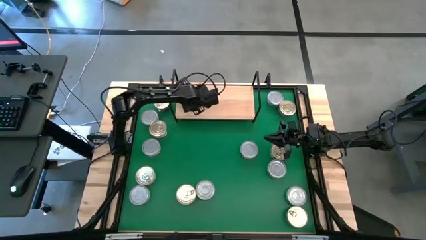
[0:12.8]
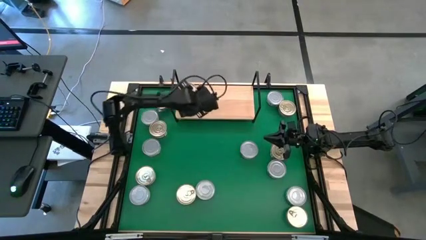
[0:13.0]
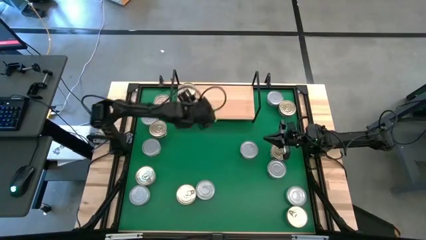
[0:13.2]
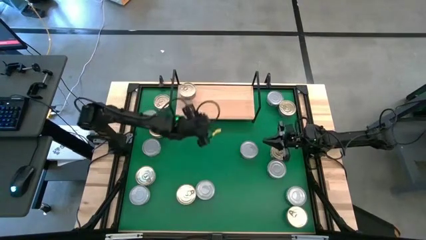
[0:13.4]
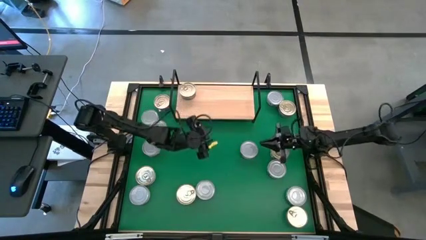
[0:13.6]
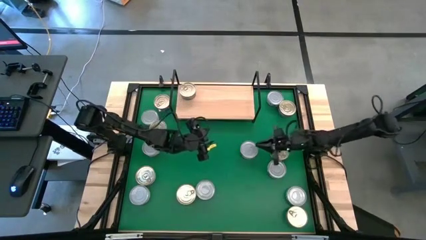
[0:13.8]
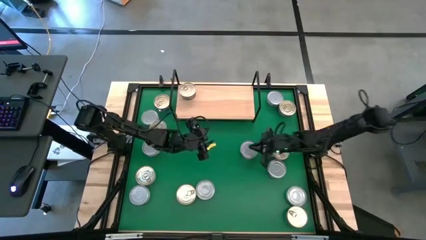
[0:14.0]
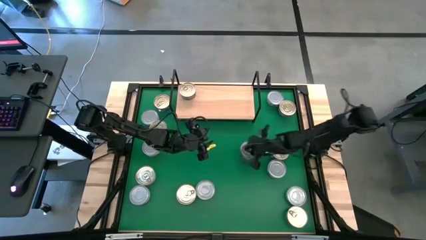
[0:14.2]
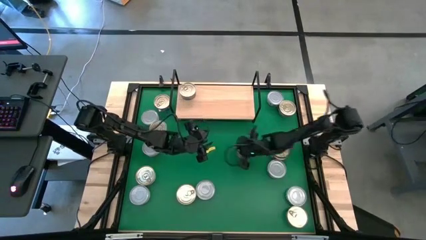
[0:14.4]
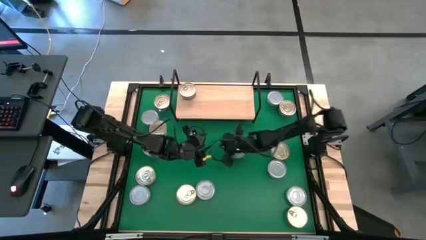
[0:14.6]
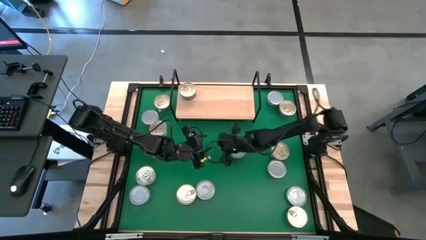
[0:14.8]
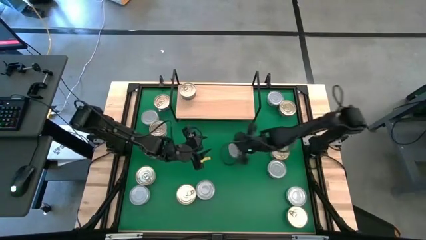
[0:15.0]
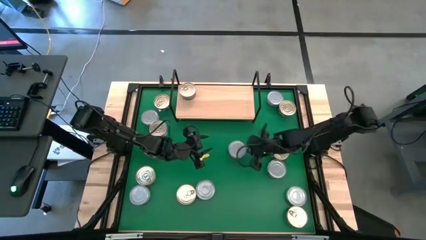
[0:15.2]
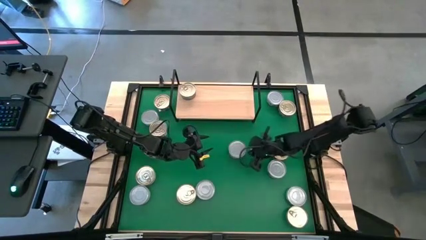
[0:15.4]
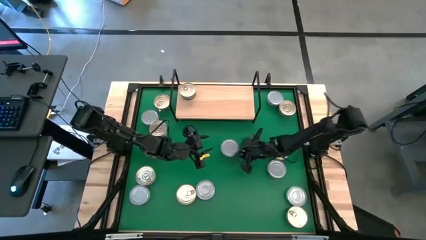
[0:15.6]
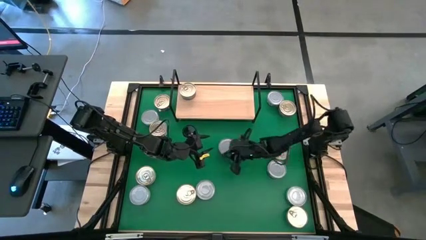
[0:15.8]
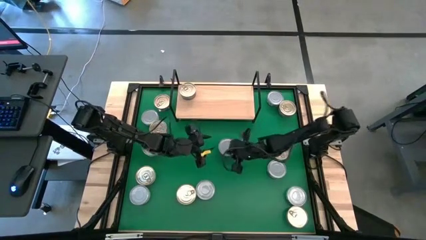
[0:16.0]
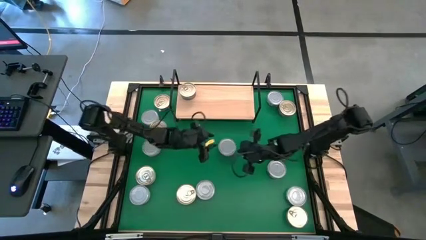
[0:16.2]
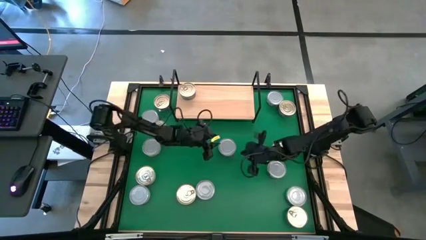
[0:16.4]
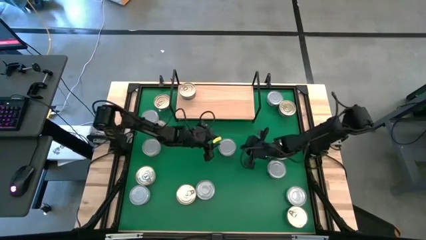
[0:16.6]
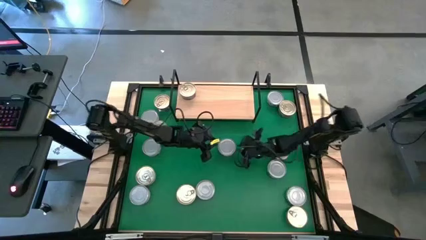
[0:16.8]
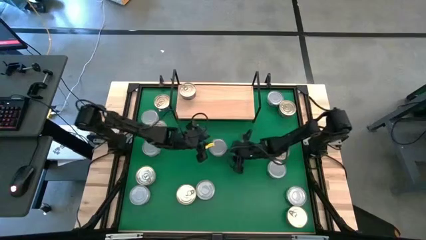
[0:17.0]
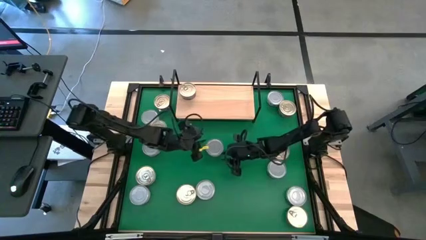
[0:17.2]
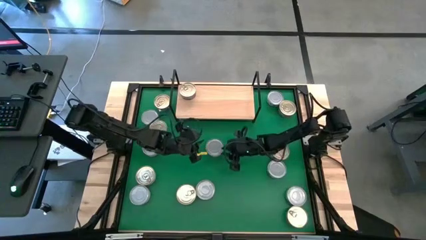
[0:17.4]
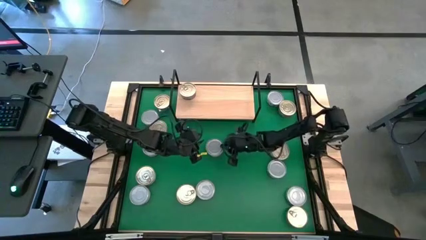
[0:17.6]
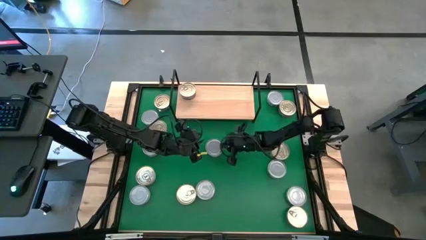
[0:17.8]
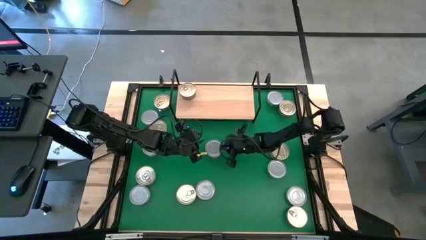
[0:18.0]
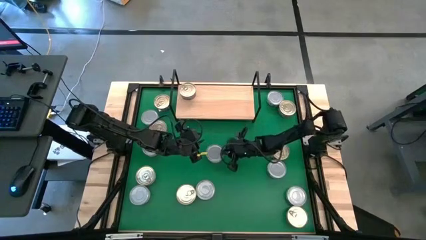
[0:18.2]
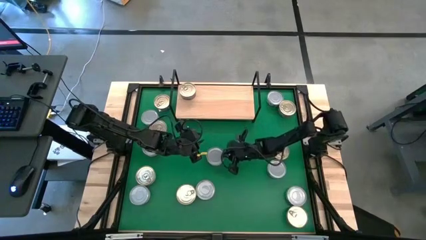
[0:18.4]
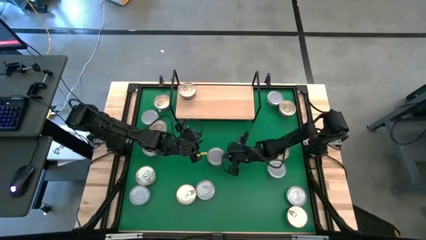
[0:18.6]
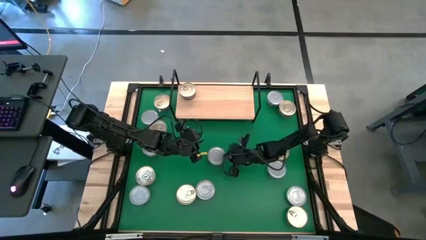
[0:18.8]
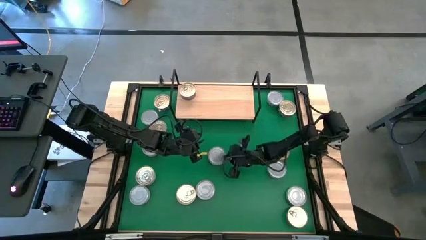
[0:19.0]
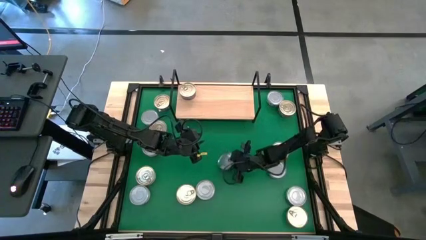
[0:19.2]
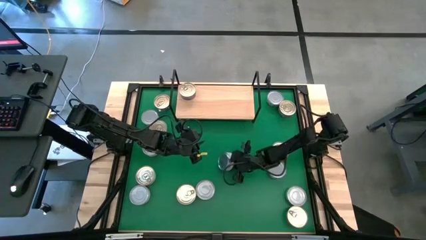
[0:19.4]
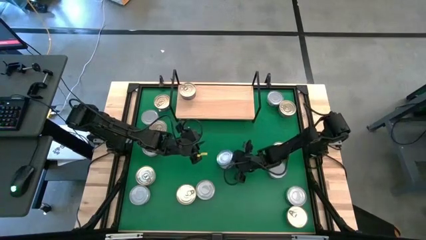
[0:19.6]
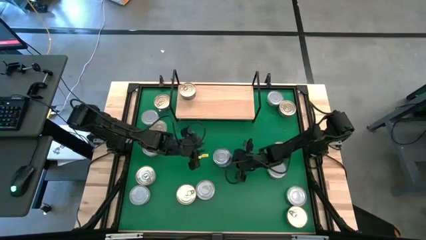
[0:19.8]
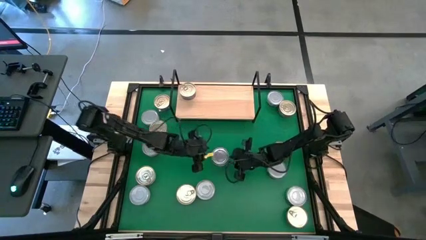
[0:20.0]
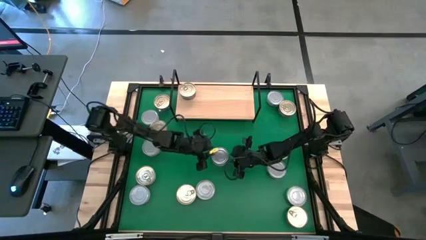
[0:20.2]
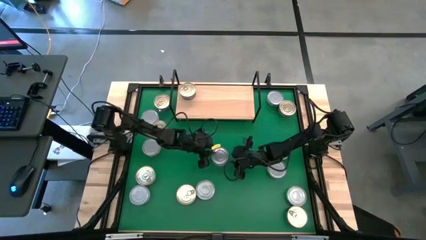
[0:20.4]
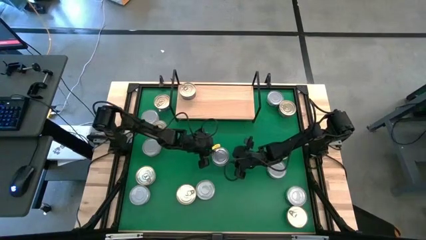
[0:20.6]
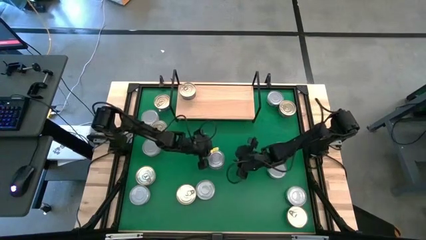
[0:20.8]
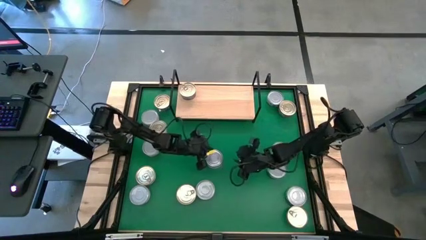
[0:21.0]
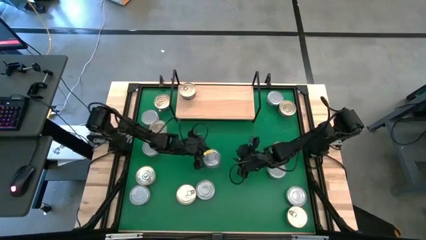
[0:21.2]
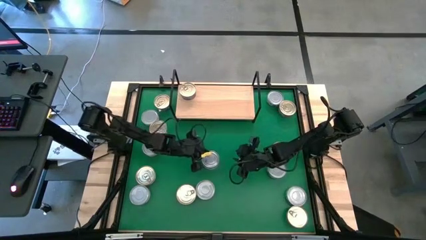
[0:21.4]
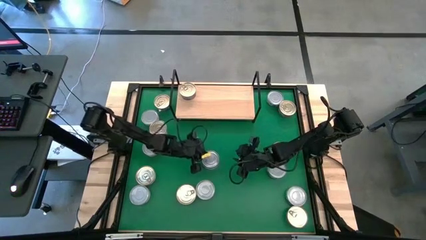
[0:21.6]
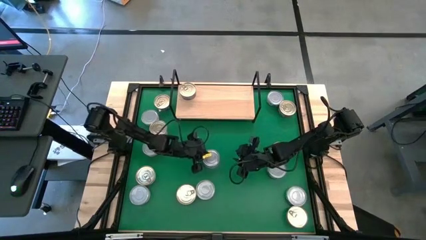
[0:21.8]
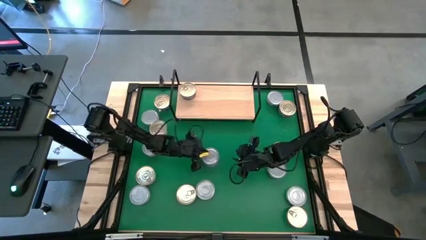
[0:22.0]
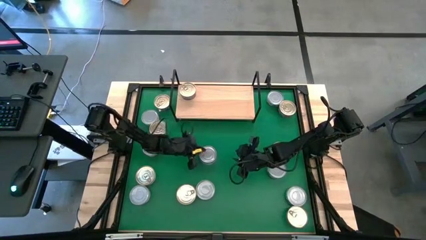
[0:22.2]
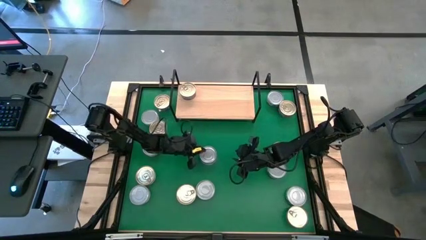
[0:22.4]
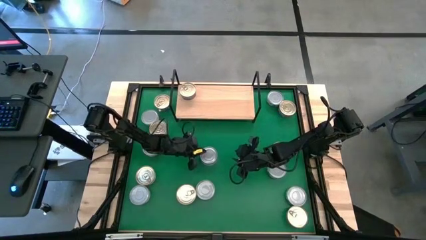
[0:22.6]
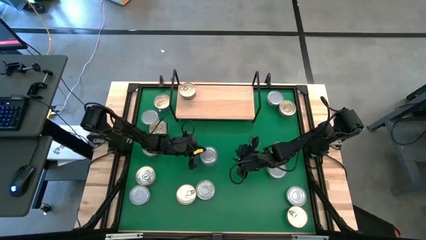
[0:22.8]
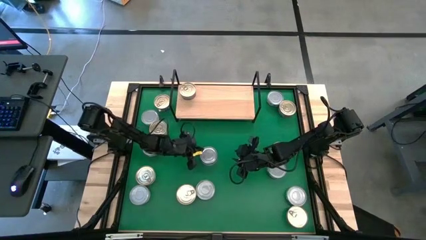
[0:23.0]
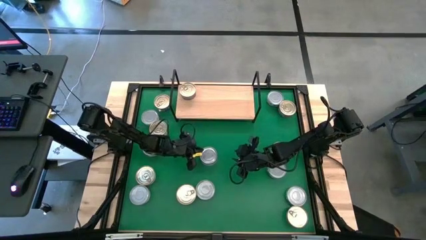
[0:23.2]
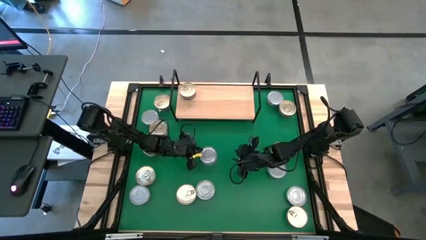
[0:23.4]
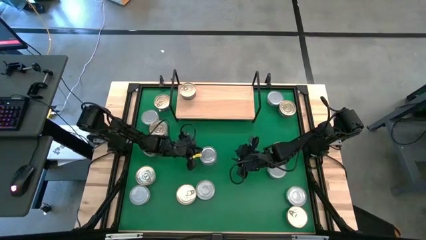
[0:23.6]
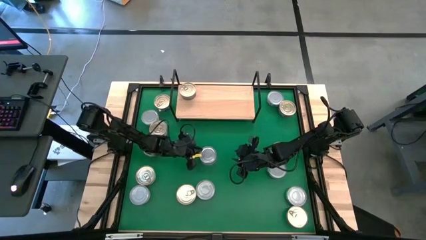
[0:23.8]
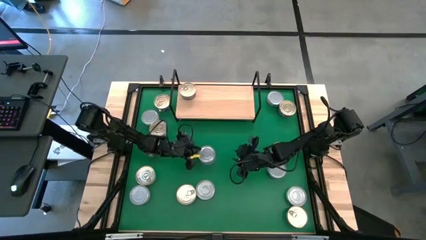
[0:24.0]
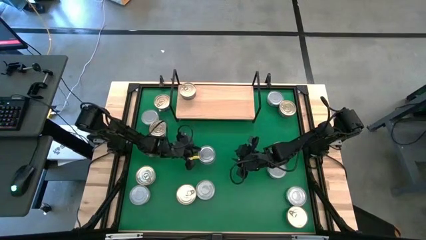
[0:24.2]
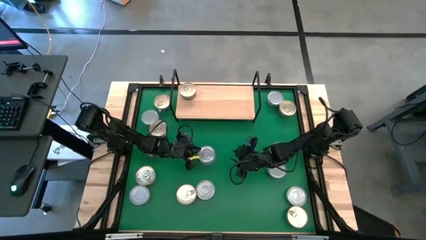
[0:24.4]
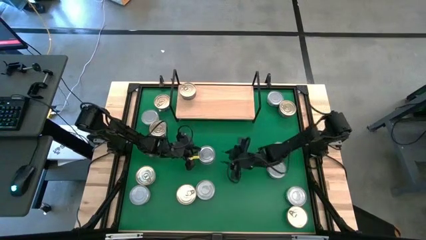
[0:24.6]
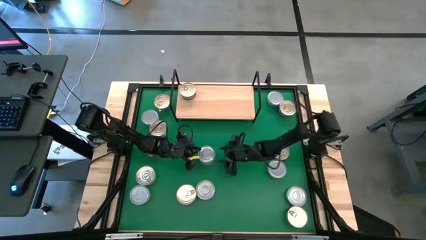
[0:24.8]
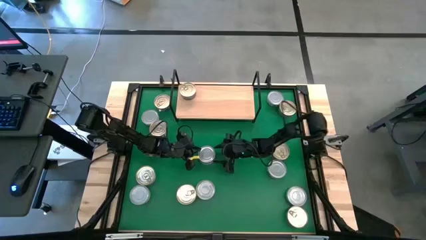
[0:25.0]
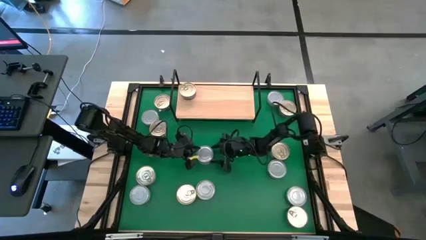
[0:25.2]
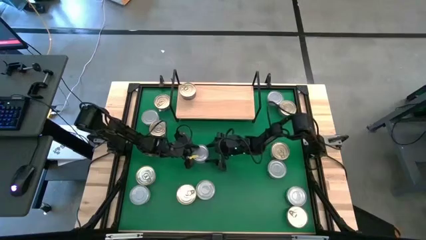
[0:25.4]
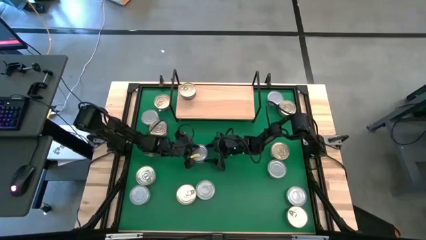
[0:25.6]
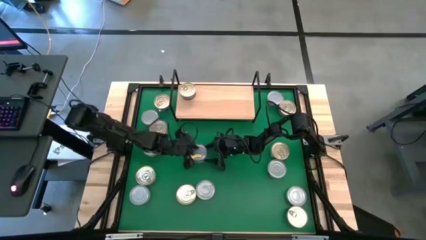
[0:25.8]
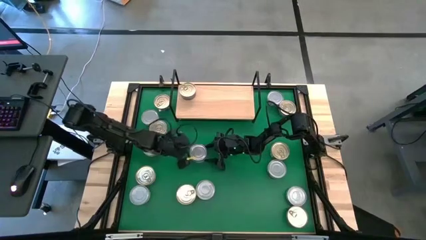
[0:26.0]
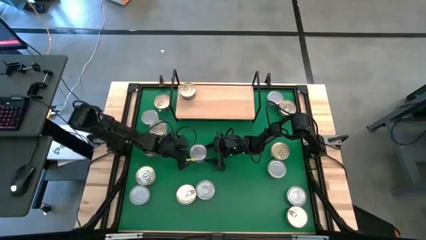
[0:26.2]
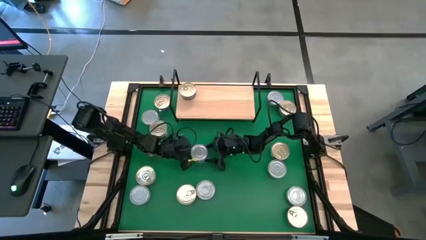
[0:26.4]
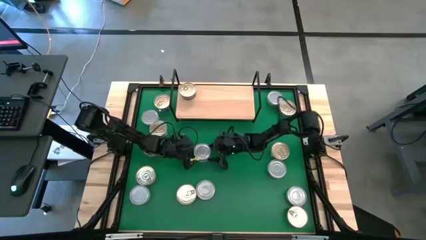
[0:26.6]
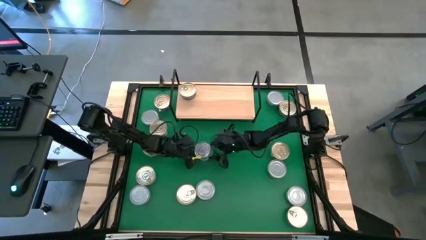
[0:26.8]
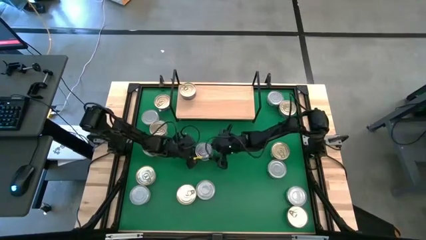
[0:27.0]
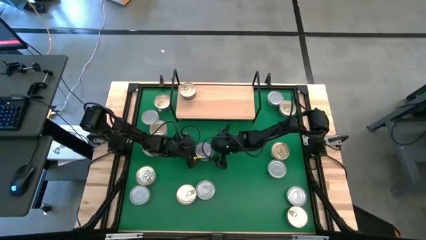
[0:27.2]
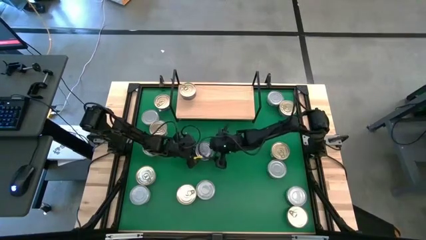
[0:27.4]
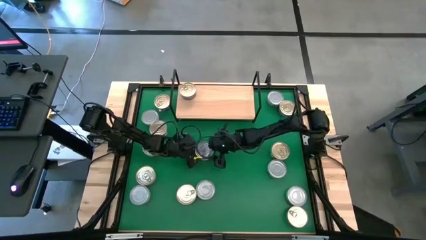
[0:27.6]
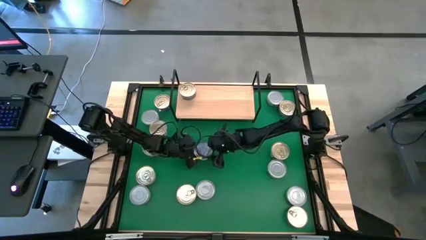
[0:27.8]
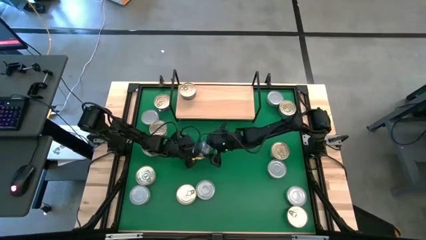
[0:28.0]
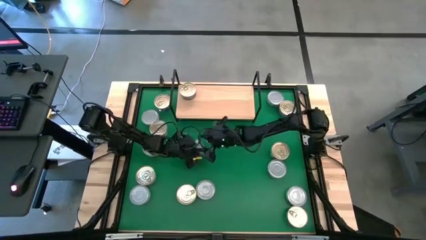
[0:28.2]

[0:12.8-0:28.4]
Task: Stack canned seafood by type on shelf
Put the green white tuna can on the shelf
